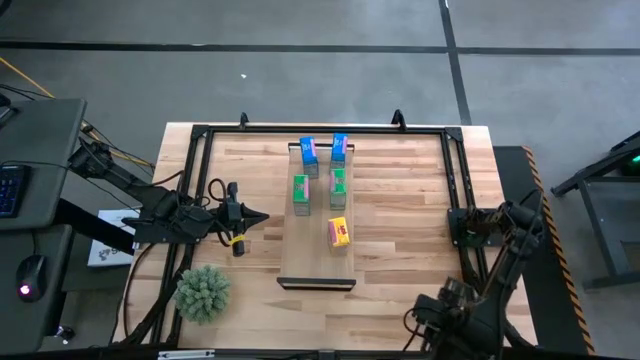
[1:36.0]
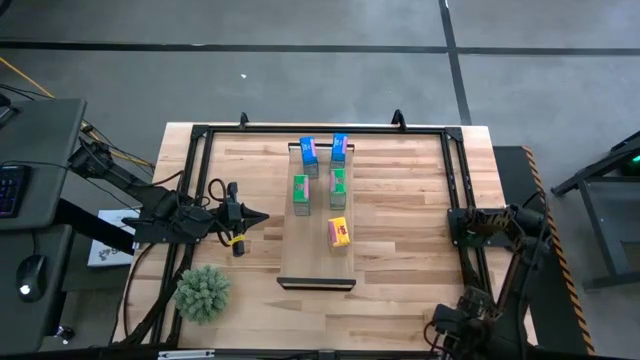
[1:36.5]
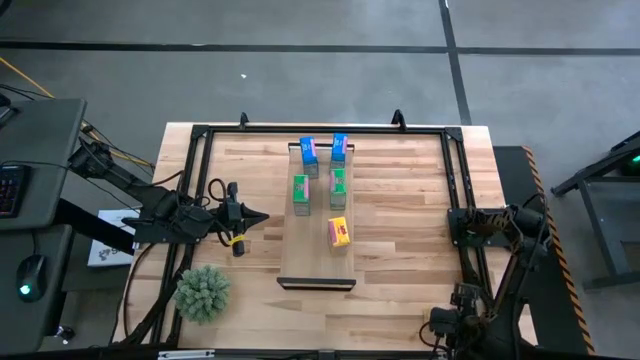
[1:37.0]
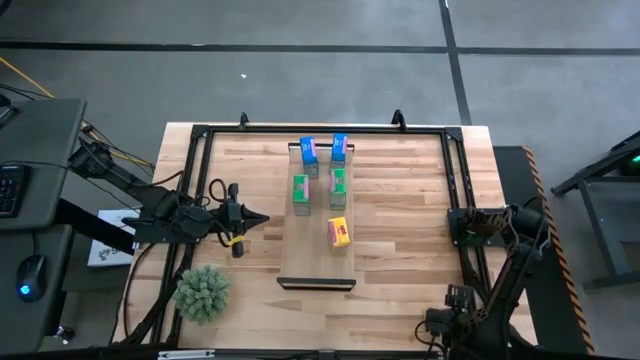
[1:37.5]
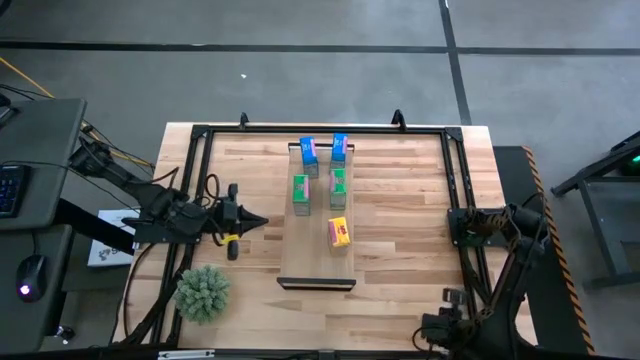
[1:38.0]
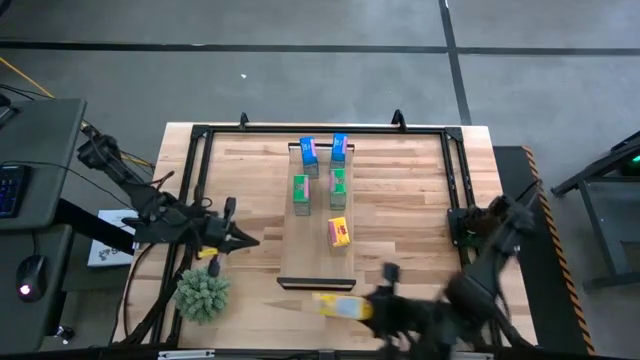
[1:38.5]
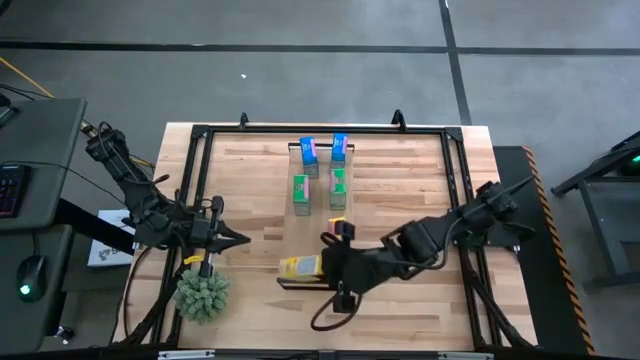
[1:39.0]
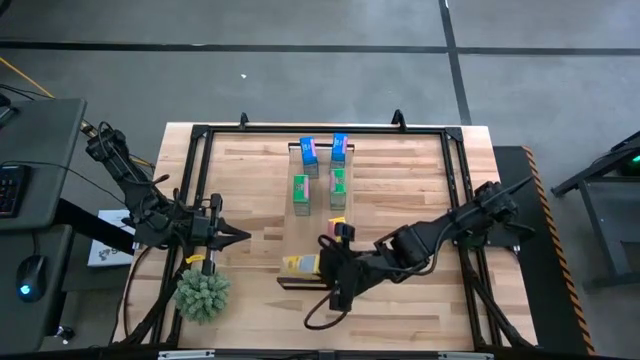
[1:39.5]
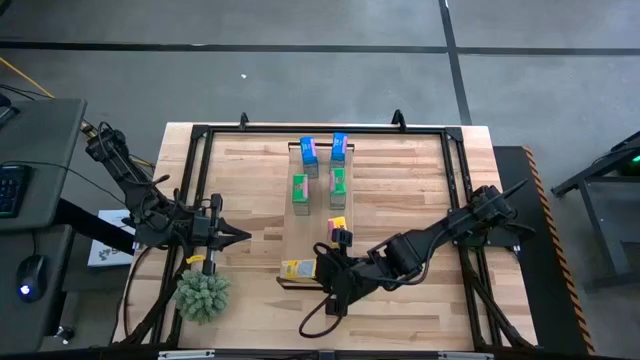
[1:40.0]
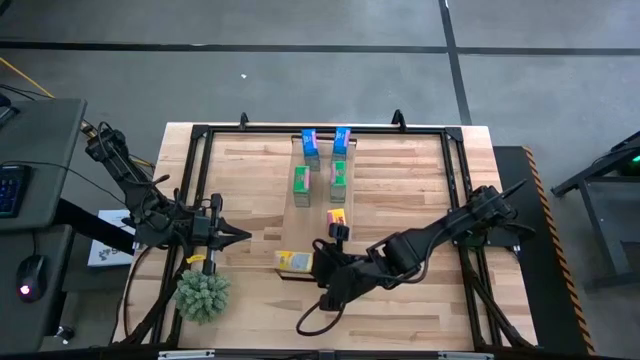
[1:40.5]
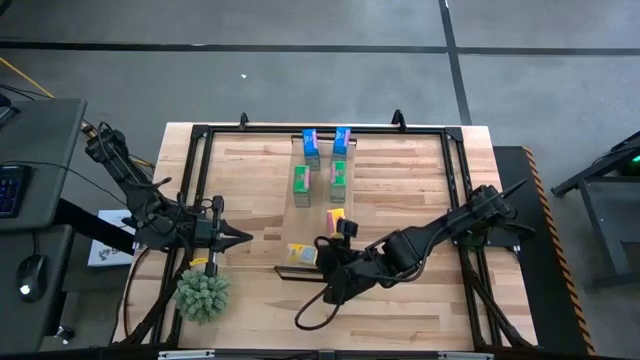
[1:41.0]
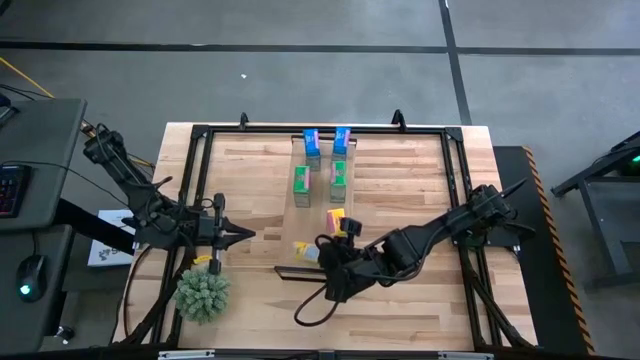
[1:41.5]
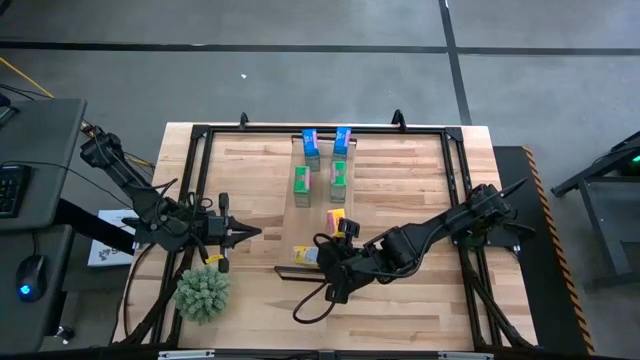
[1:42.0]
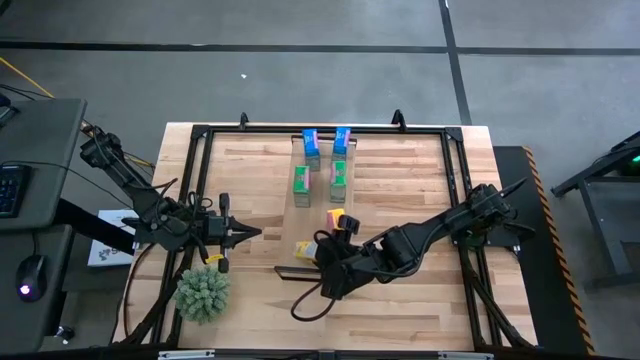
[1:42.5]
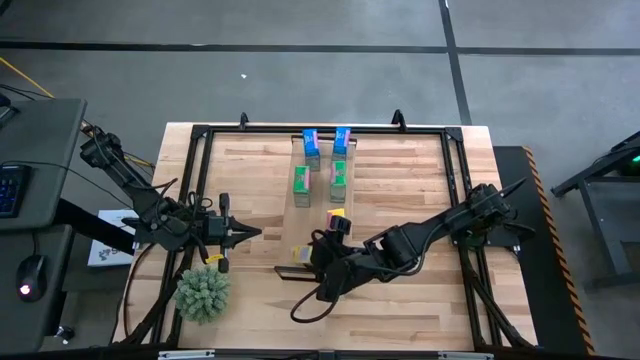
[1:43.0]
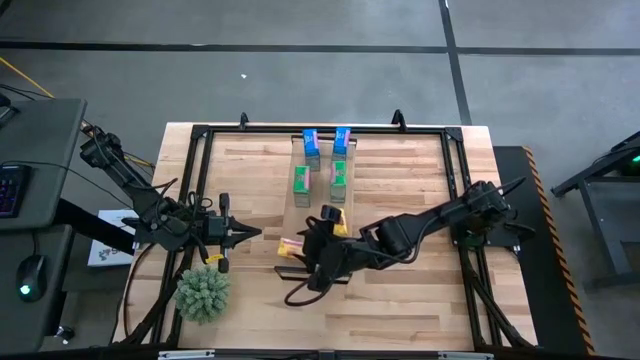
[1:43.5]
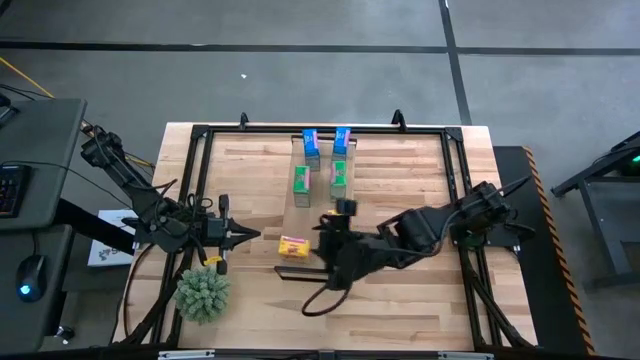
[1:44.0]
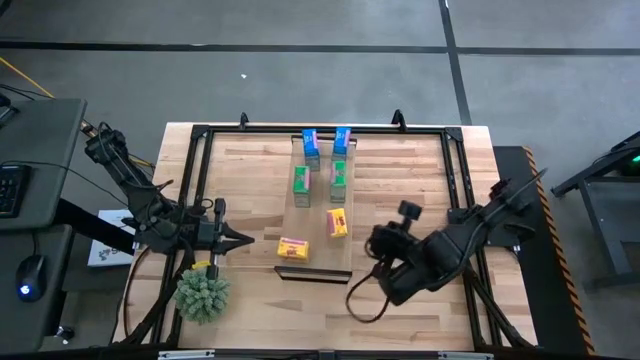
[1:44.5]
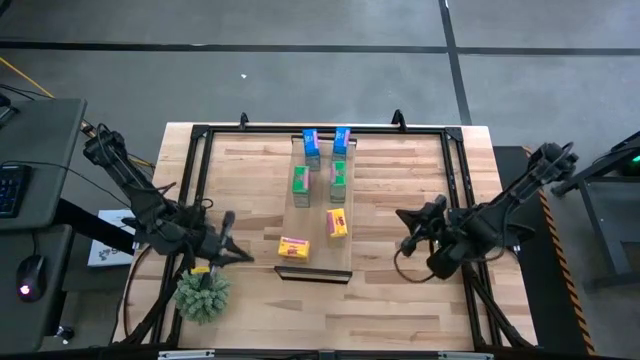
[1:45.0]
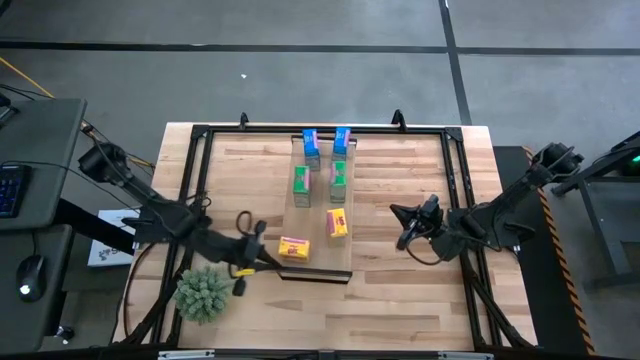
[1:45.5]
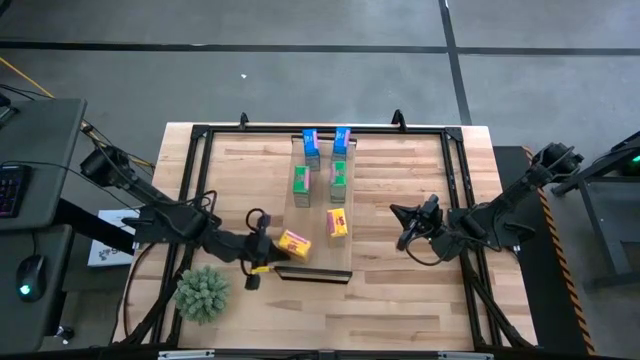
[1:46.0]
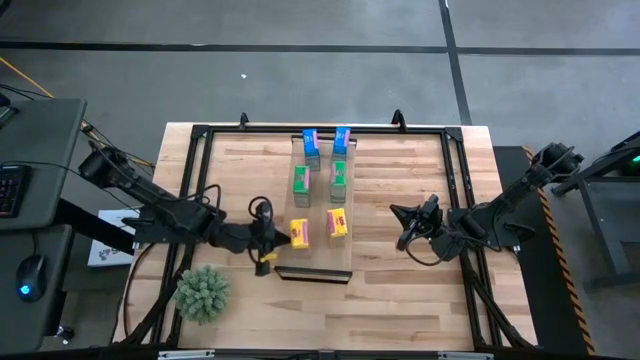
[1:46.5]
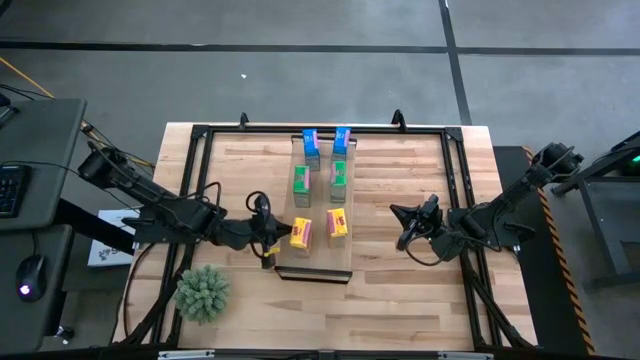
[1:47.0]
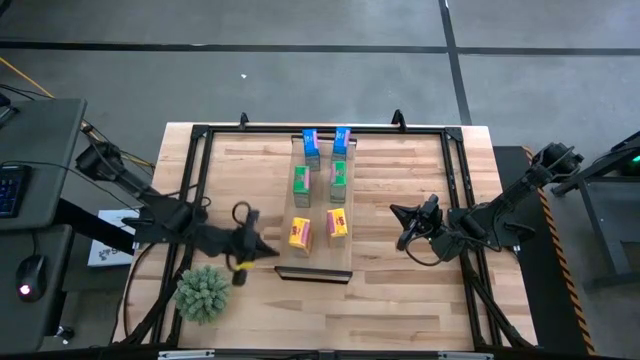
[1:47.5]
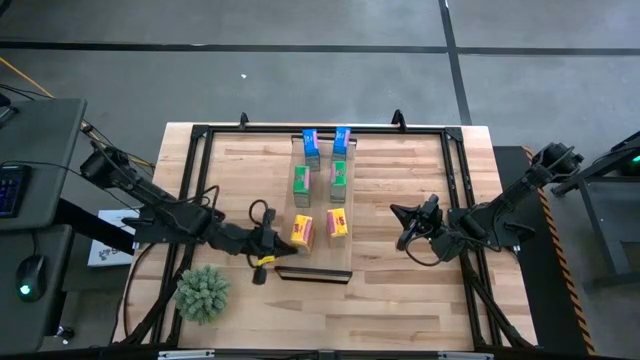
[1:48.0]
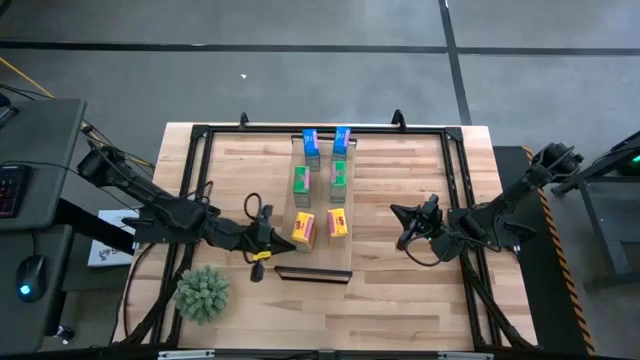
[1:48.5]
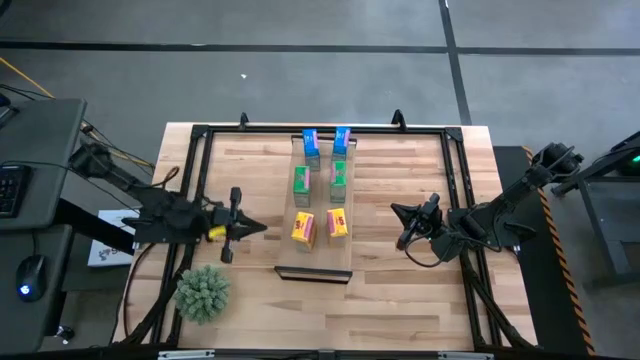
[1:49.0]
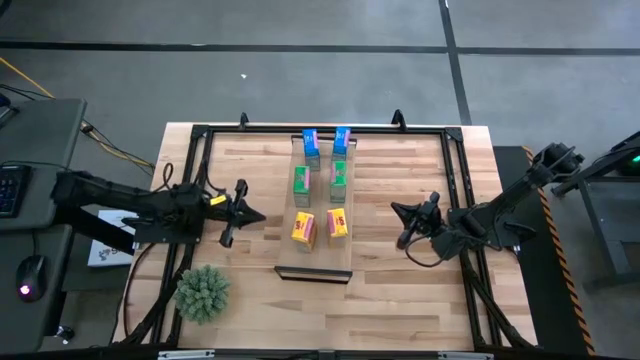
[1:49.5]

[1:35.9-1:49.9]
Task: Stack cereal on shelf
Put the yellow cereal box on the shelf aligned with the other yellow cereal box

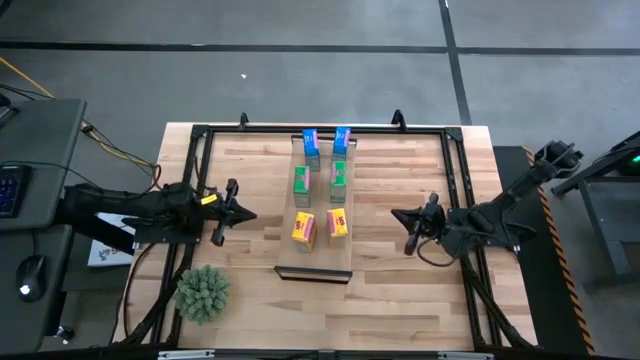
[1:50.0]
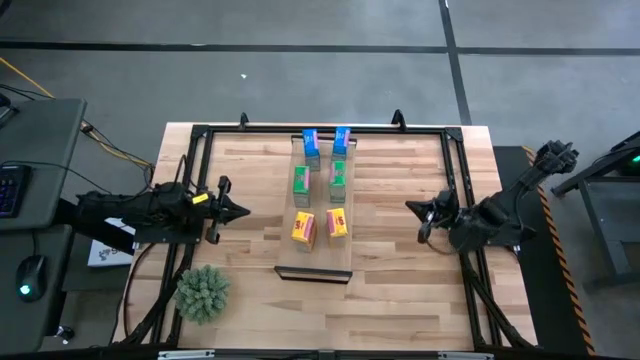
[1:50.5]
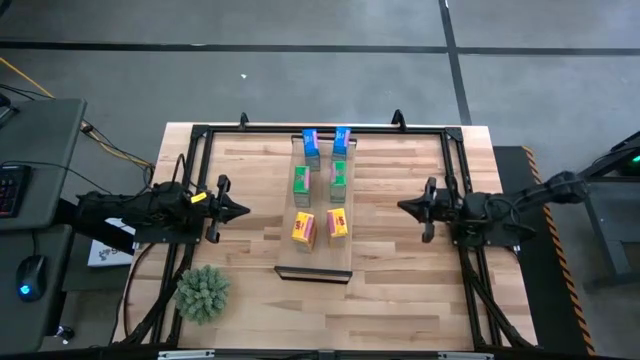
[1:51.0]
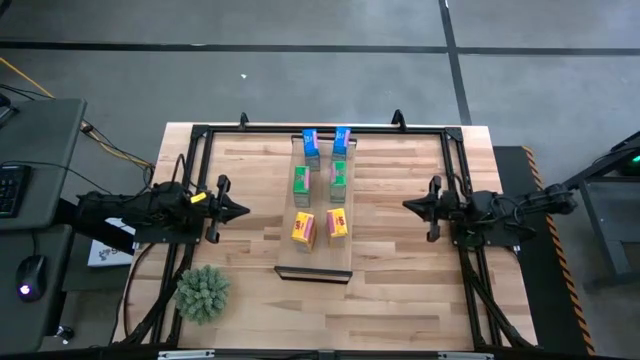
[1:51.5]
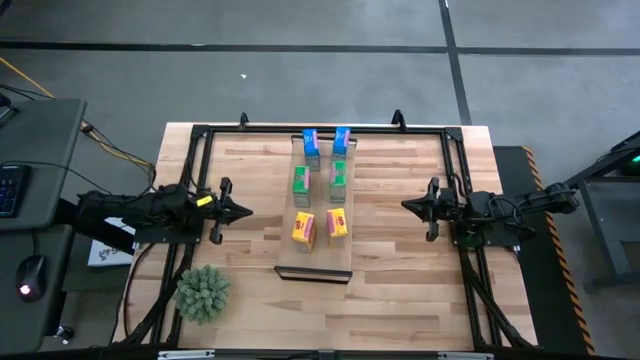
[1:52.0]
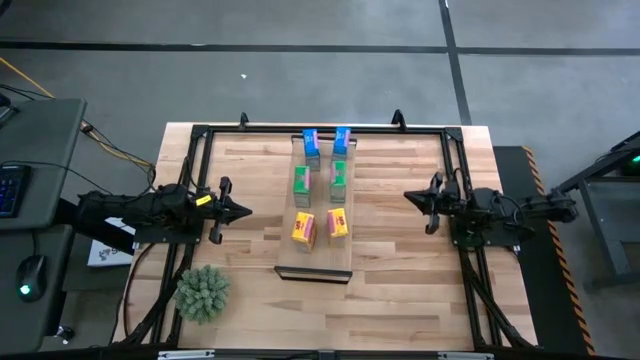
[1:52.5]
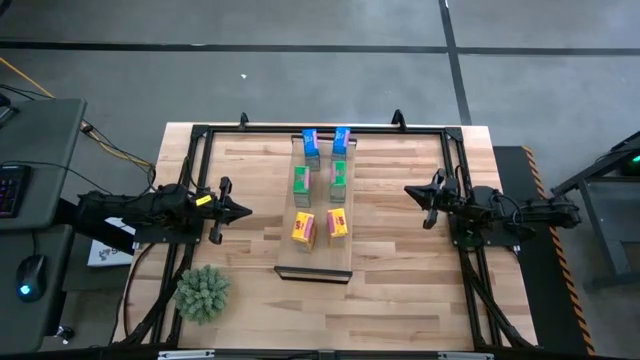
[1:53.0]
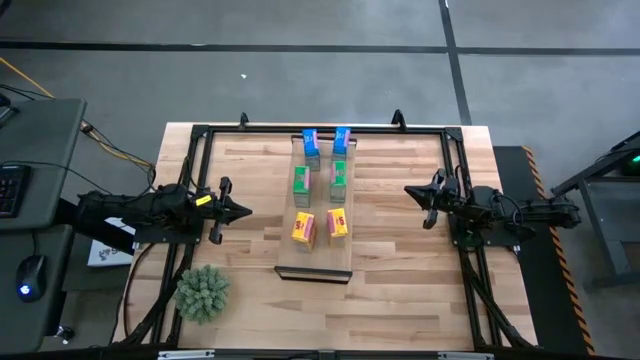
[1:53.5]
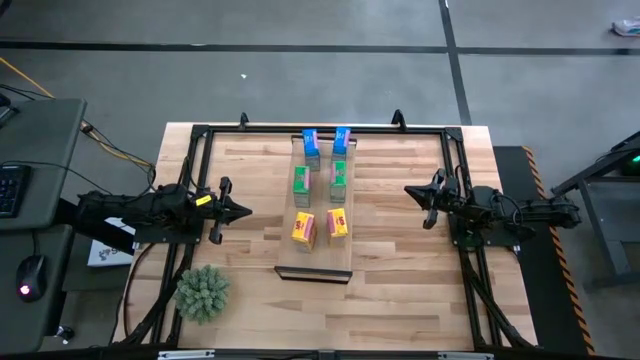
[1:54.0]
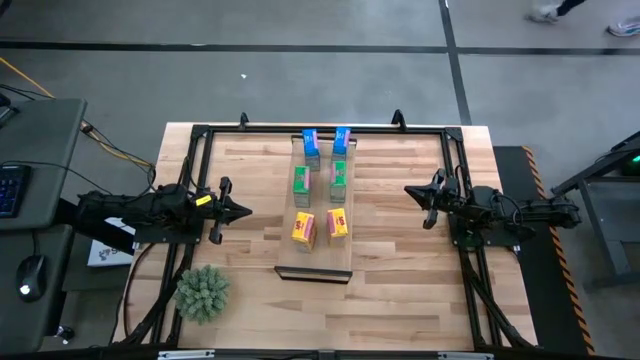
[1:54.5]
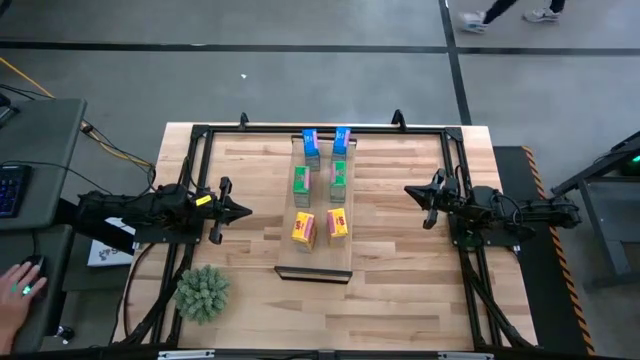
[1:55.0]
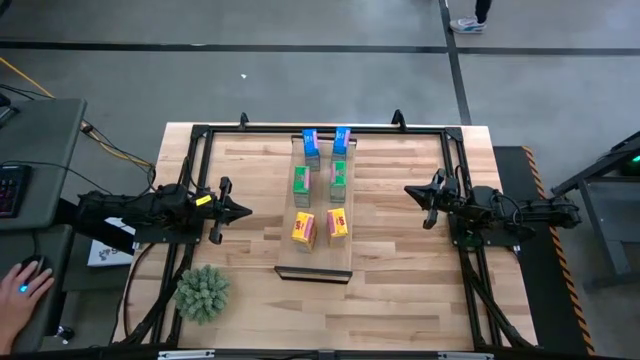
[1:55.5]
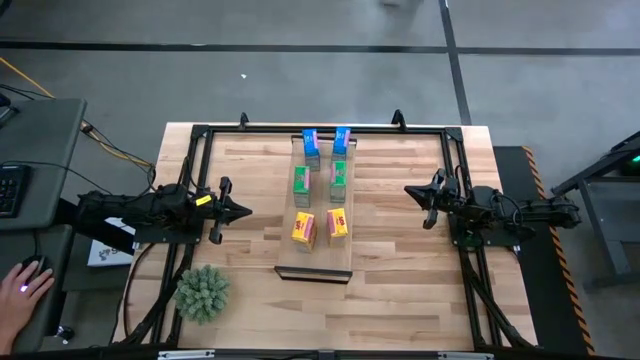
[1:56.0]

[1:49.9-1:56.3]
Return to Home Position

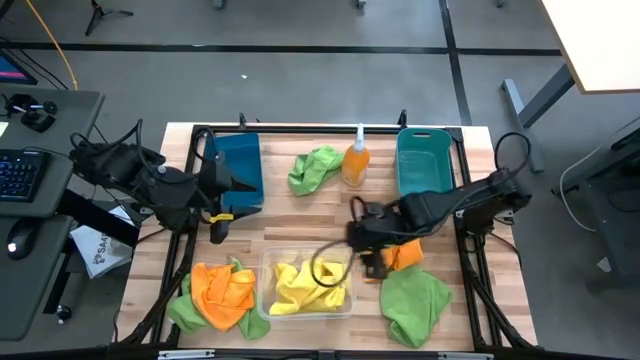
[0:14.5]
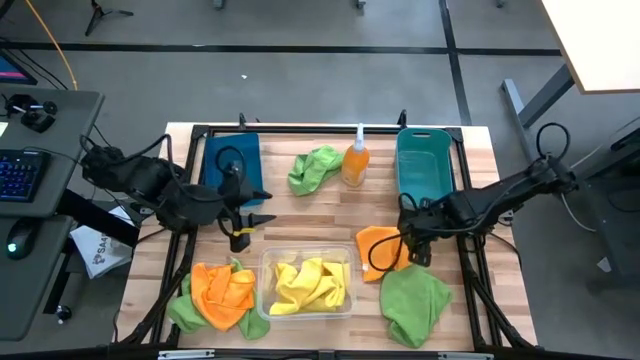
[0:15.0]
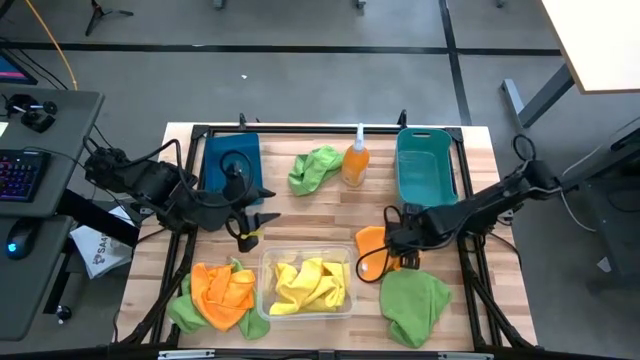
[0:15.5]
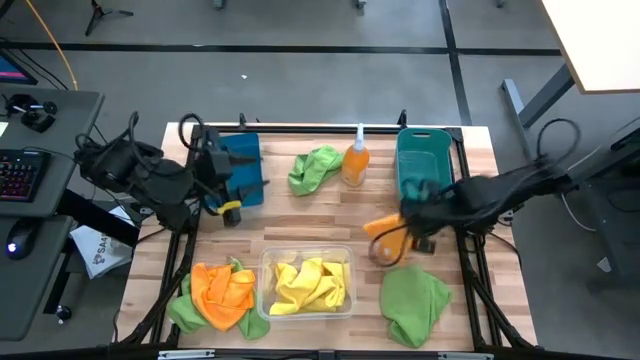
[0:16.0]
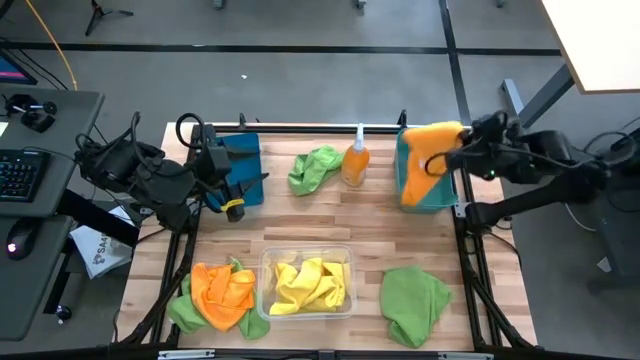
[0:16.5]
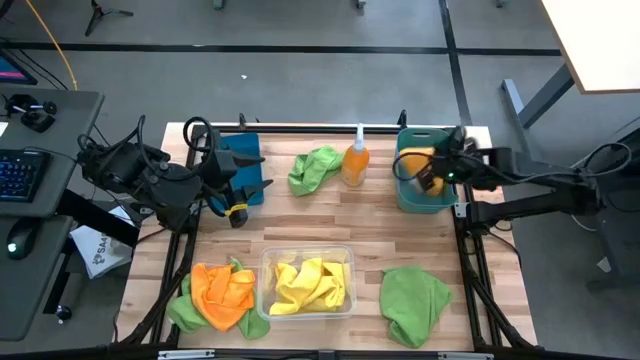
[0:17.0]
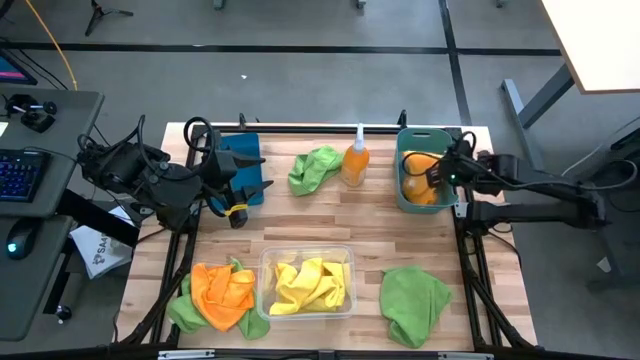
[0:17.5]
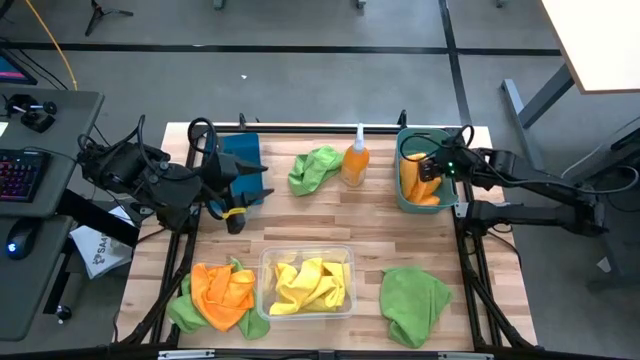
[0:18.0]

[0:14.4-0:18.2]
Task: Sort microfiber towel by color & place in baskets
Put the right orange microfiber cloth into the green bin
